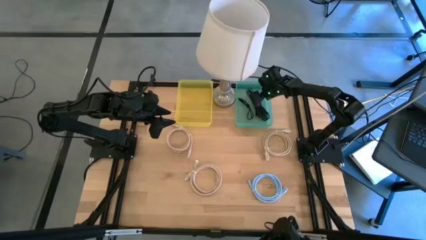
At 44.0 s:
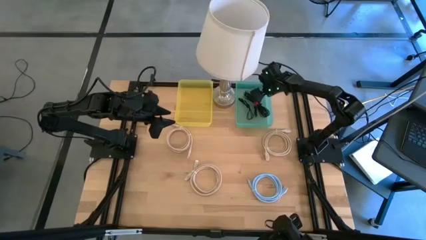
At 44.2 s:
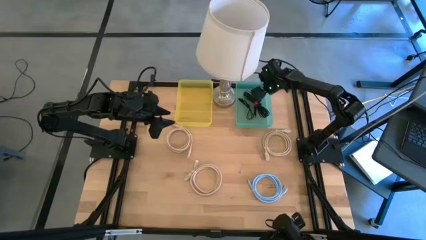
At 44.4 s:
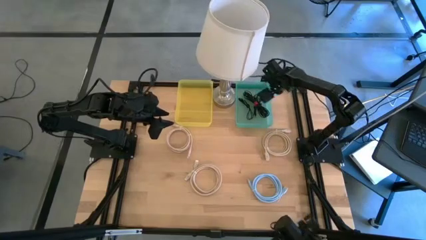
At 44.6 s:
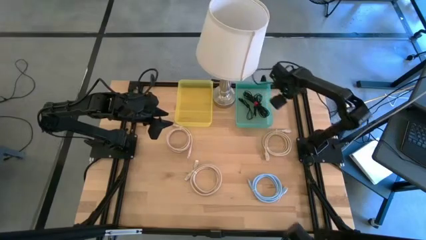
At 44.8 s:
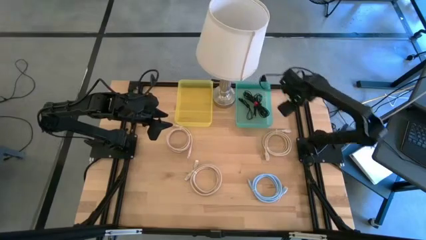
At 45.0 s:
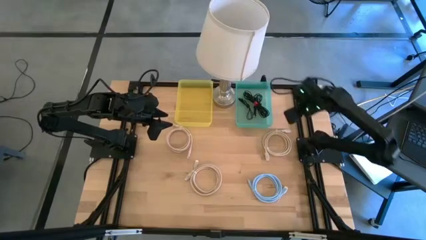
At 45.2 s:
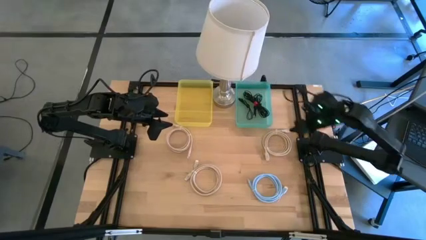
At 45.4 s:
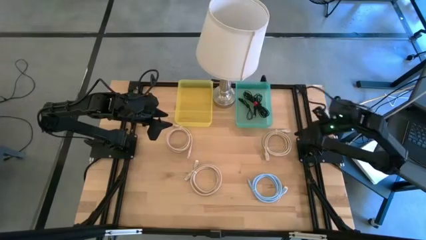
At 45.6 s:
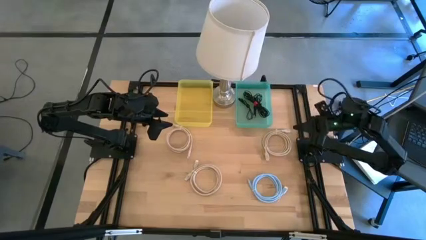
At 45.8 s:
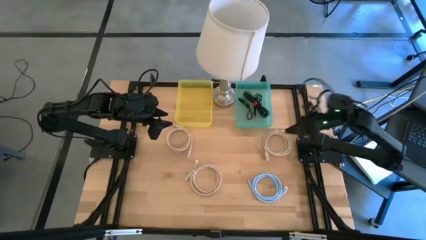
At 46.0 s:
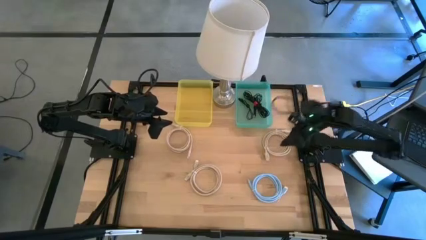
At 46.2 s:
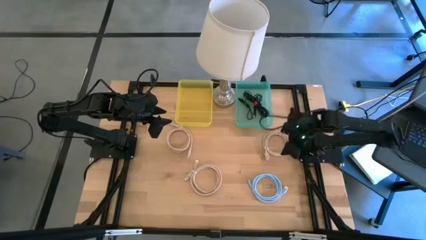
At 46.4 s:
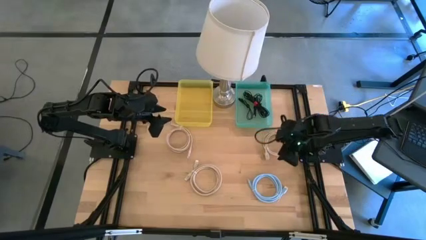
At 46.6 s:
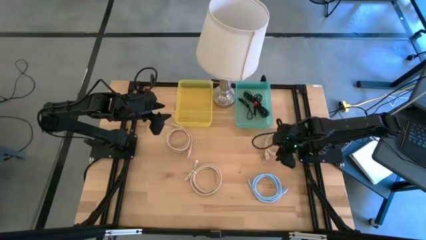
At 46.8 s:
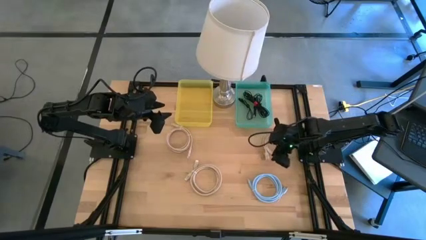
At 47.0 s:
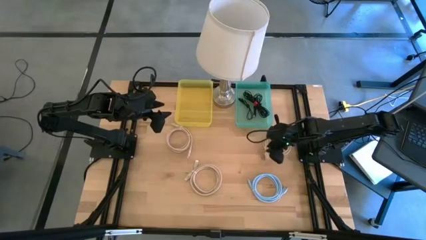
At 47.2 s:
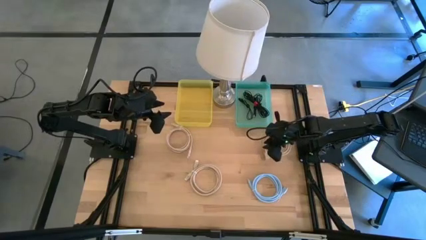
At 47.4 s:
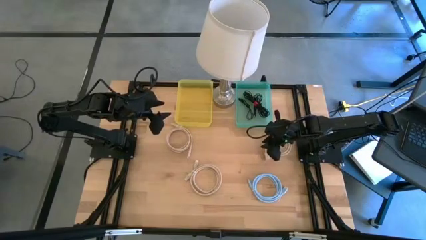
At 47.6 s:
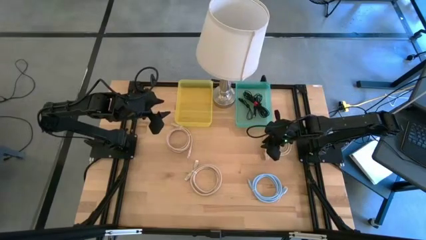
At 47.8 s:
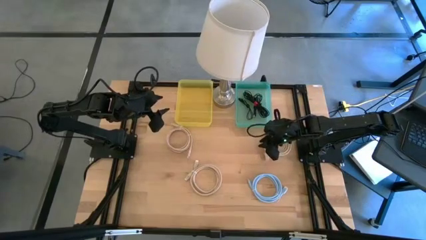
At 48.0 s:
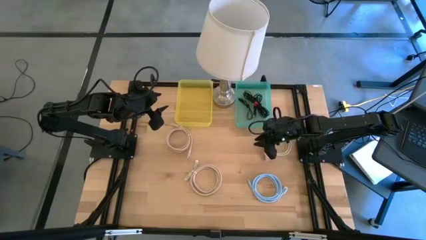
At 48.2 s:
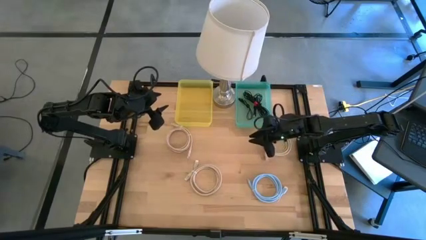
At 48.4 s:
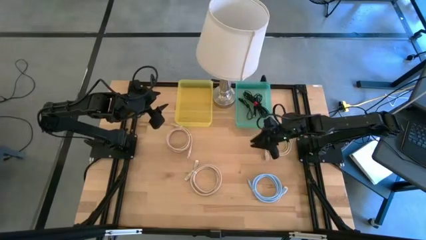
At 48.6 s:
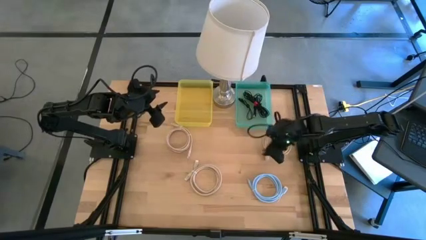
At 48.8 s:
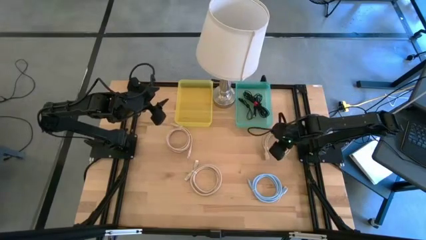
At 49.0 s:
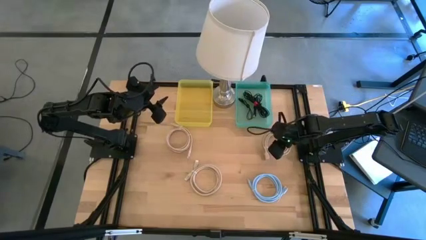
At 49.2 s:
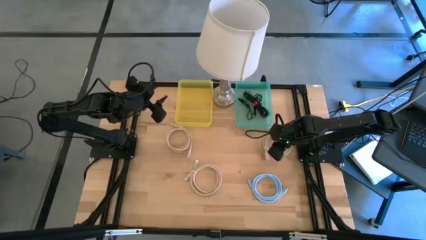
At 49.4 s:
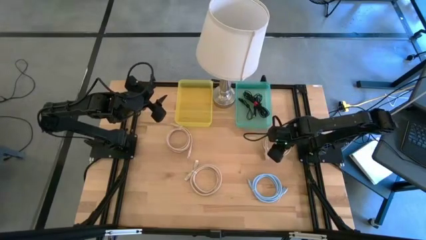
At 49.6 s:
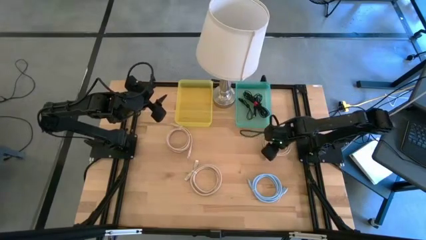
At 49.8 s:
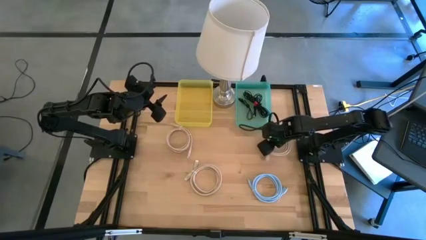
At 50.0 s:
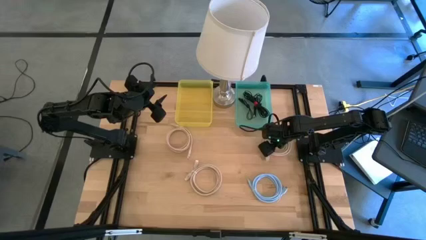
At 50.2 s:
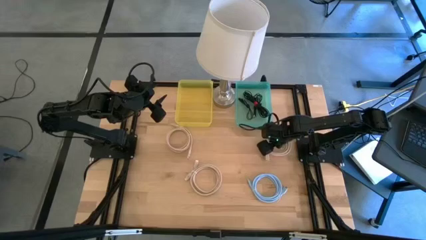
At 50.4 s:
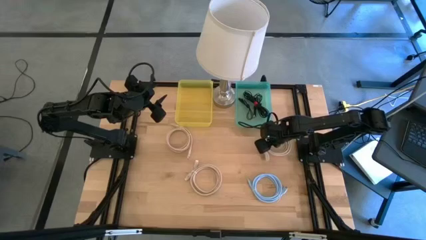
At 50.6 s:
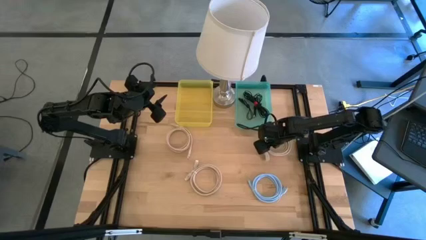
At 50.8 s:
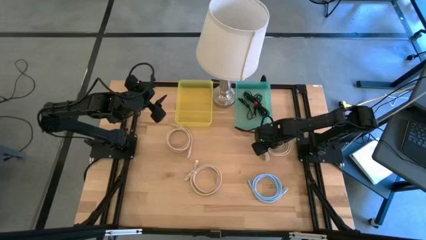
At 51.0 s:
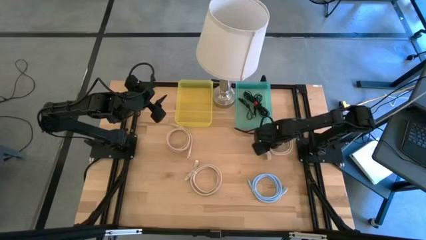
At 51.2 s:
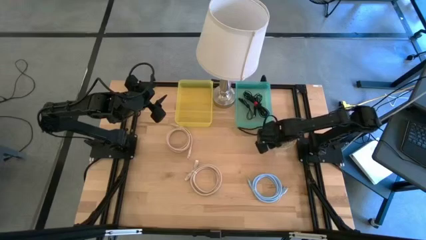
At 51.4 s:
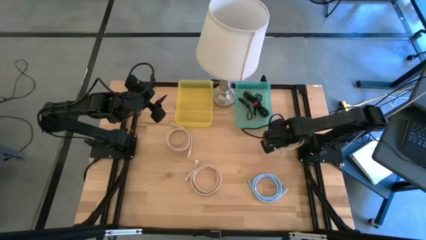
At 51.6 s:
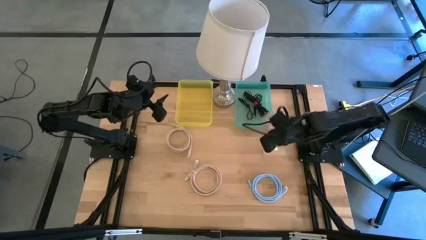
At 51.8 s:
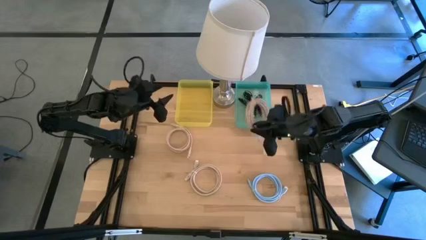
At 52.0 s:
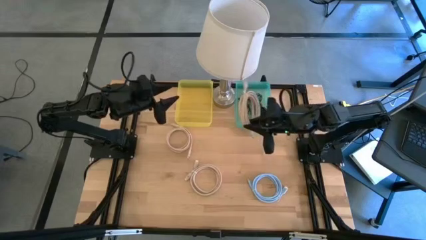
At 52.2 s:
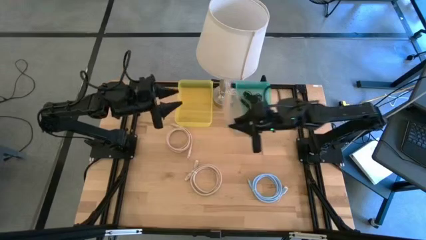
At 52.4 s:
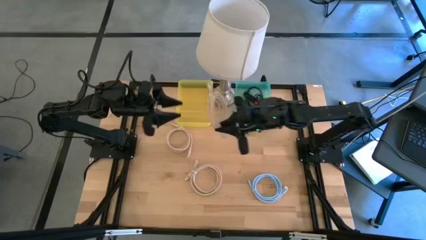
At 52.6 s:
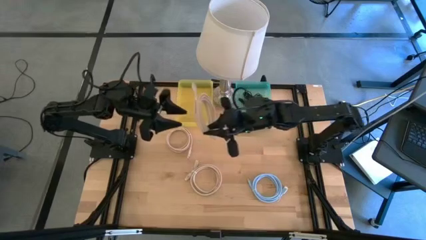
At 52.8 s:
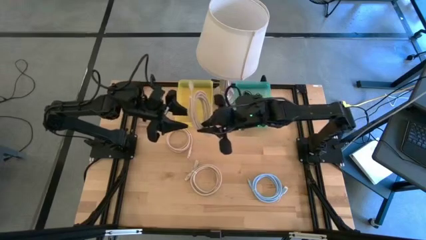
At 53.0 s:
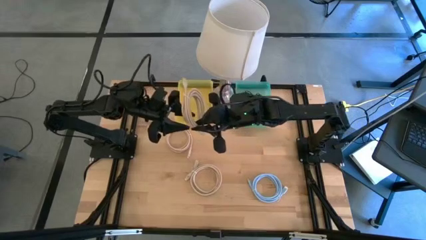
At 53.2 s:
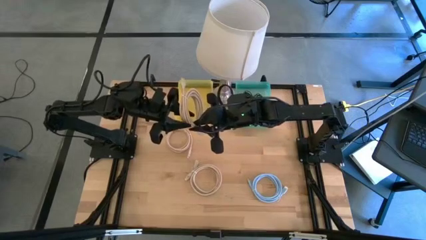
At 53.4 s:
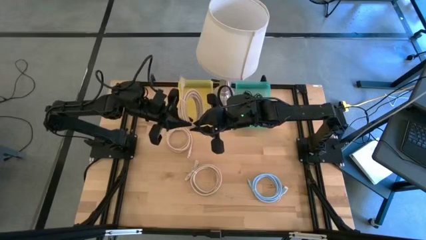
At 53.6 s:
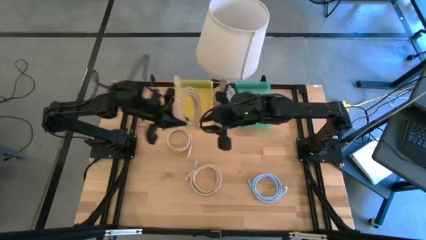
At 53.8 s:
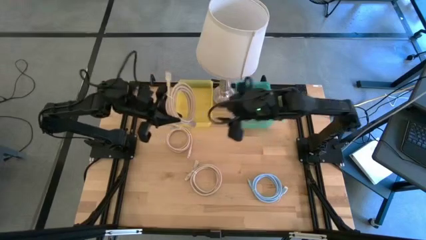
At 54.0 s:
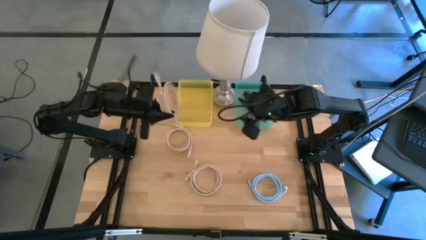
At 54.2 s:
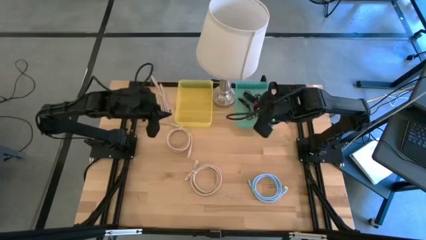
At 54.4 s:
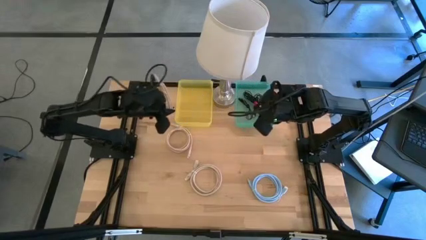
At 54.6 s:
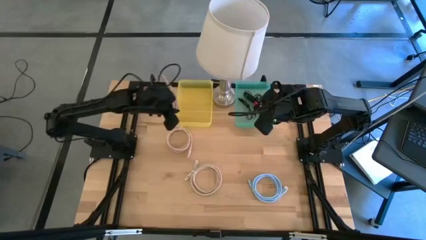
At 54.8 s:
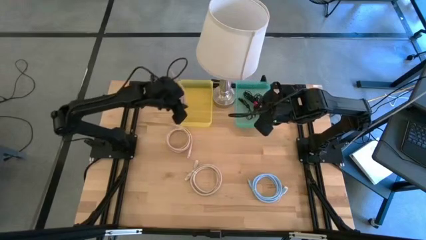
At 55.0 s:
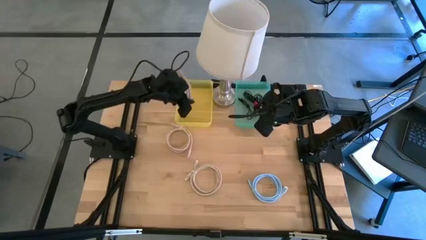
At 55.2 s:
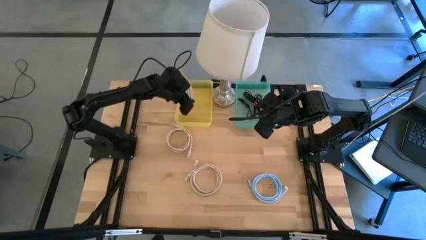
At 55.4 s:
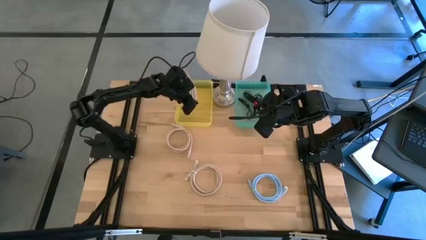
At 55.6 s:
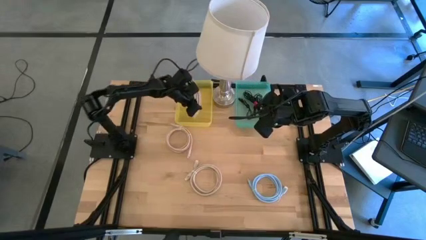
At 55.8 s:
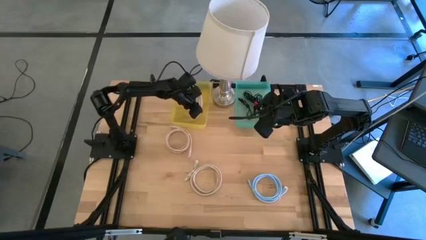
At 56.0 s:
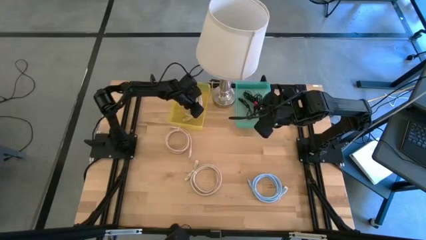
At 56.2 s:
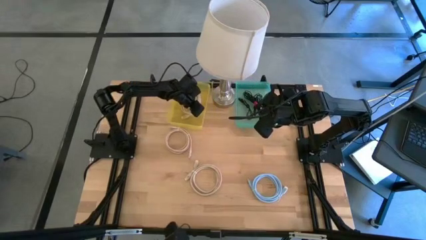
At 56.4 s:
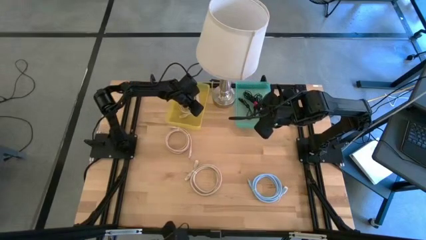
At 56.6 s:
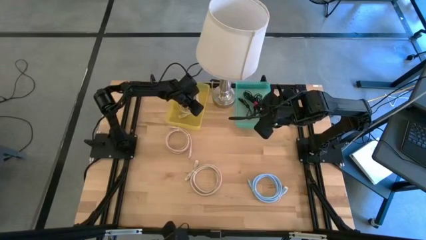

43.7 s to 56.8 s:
Put the light brown HDMI cable into the yellow bin

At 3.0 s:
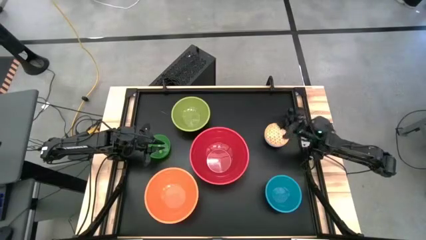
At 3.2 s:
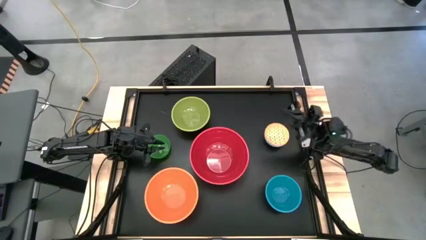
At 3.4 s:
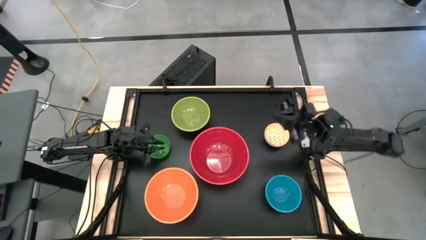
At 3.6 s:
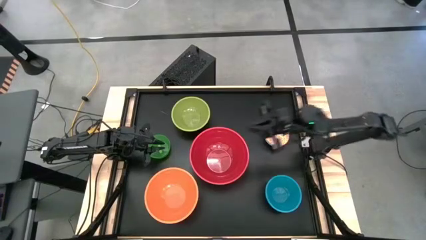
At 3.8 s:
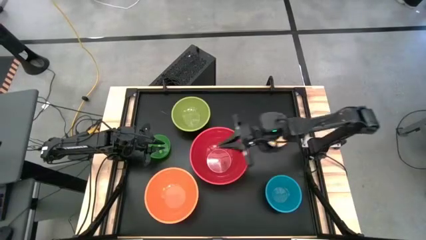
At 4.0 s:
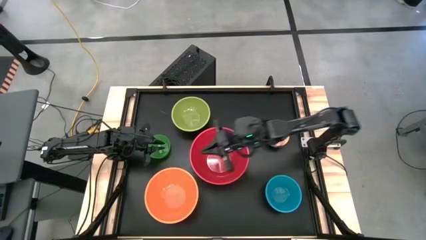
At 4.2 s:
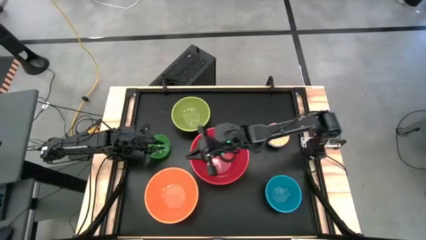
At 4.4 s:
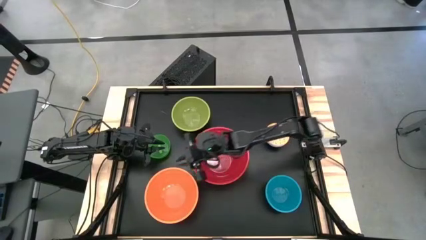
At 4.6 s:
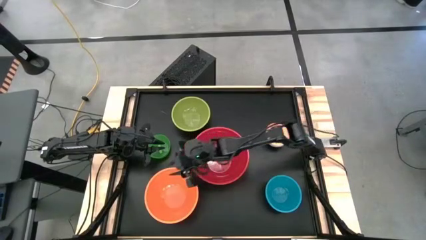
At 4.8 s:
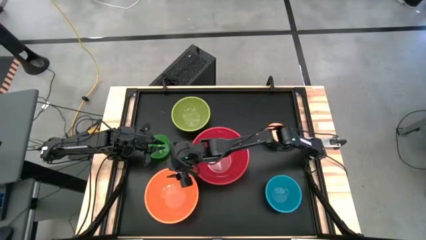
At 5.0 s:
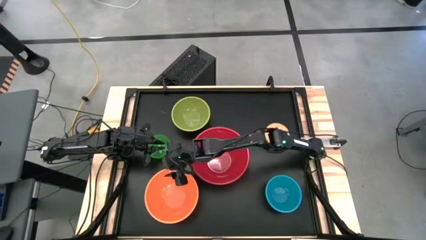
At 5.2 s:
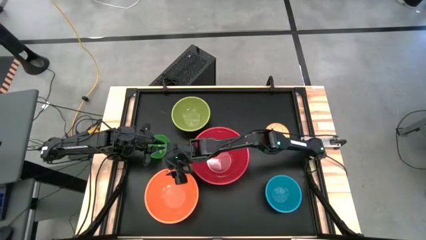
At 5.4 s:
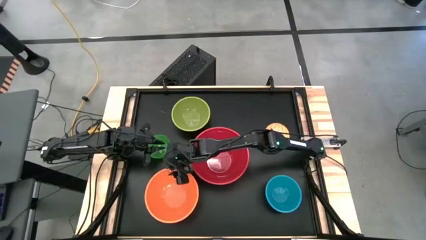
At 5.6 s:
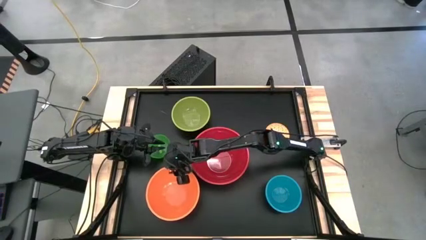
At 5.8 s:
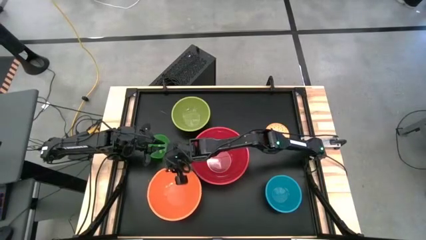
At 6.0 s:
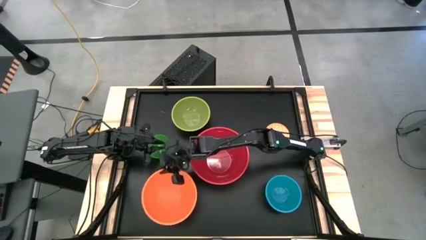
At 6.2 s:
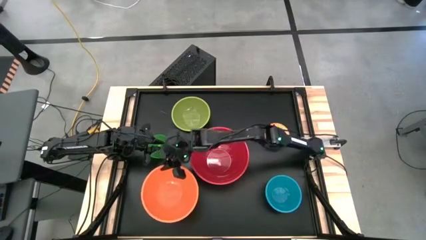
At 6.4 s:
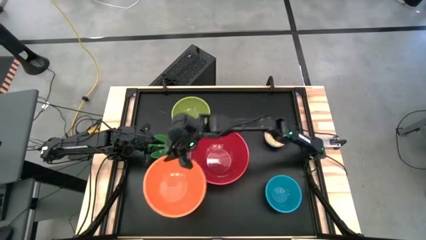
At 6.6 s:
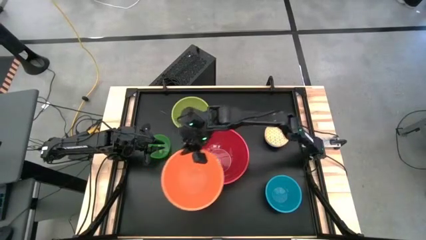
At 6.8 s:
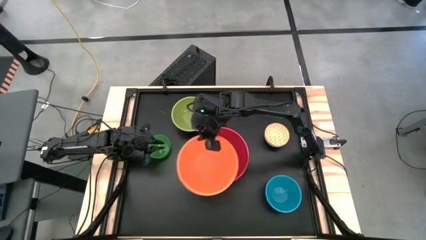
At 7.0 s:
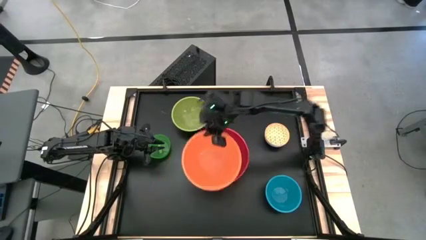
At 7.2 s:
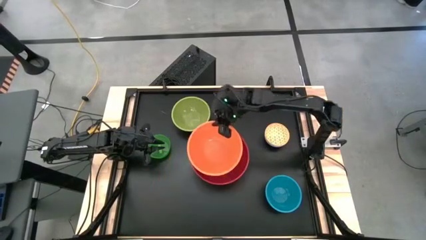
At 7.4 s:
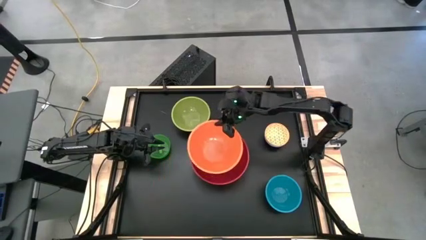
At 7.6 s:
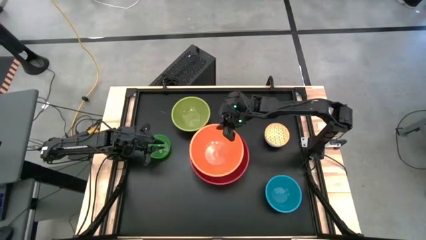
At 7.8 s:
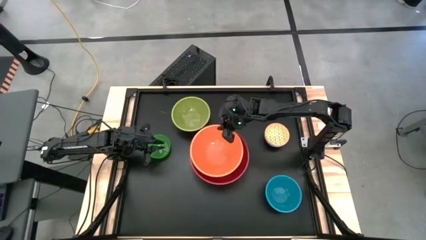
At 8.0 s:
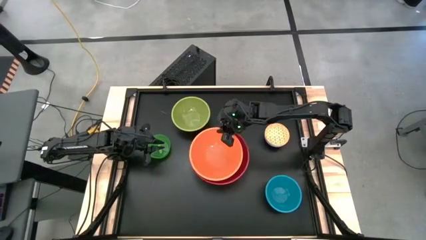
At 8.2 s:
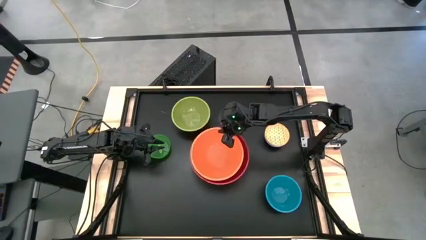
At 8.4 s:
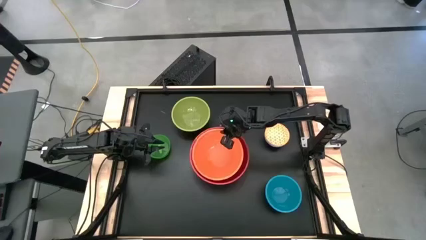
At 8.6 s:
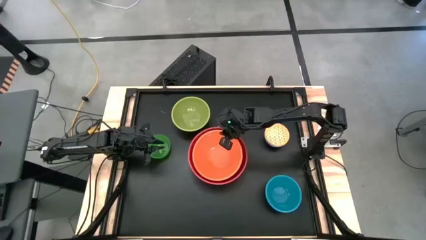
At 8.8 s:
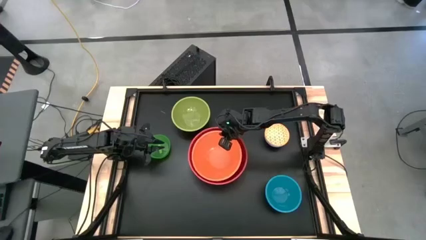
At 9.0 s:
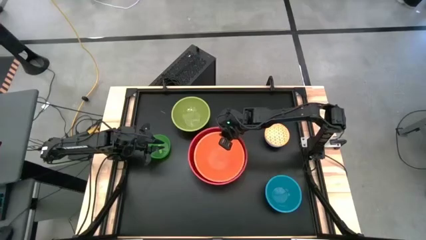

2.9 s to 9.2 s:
Stack the orange bowl on top of the red bowl
